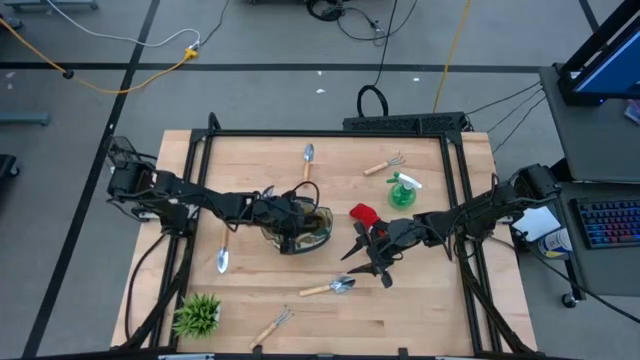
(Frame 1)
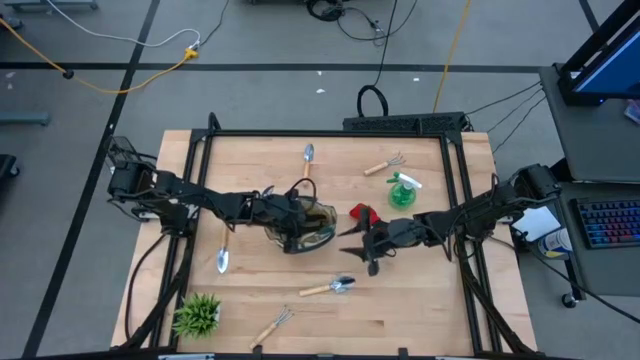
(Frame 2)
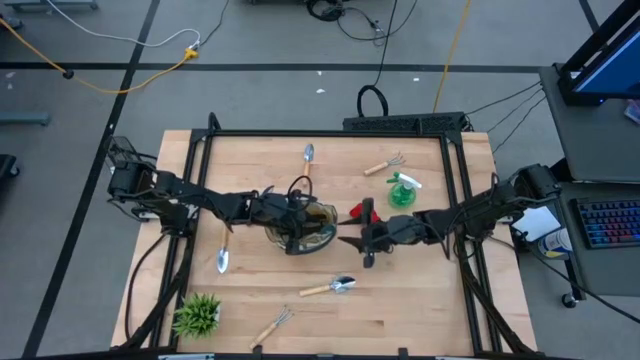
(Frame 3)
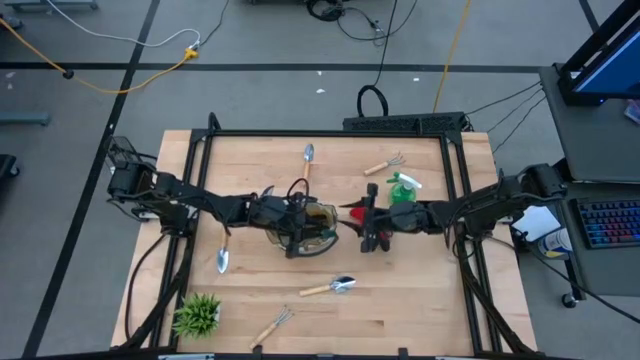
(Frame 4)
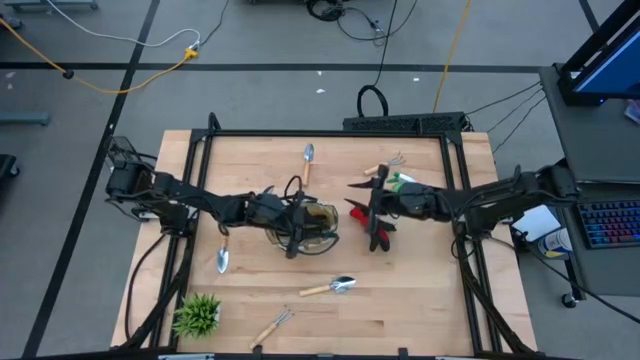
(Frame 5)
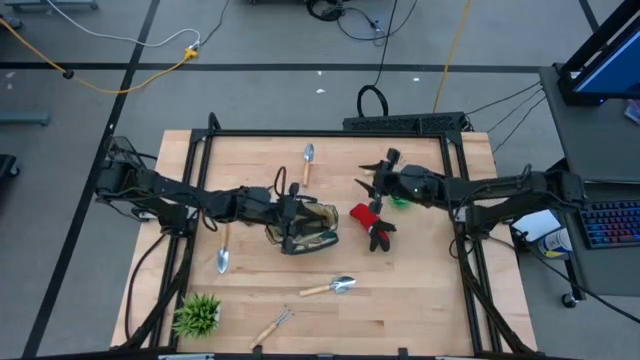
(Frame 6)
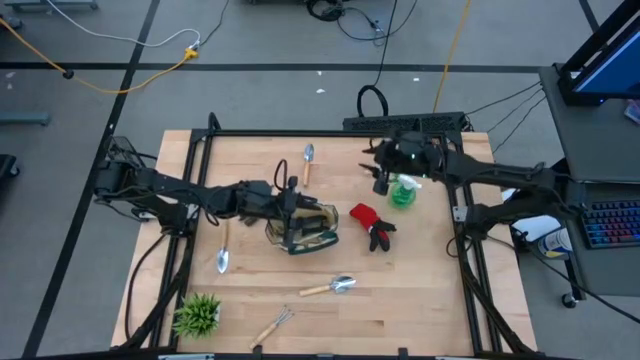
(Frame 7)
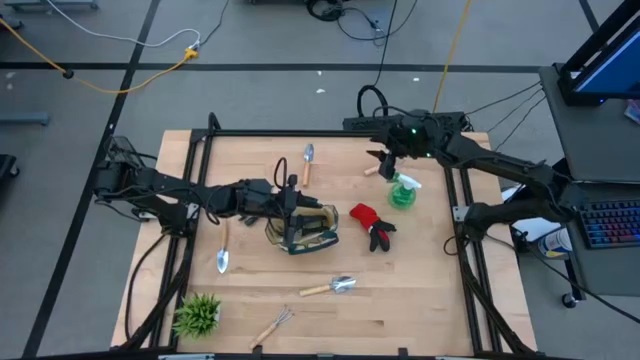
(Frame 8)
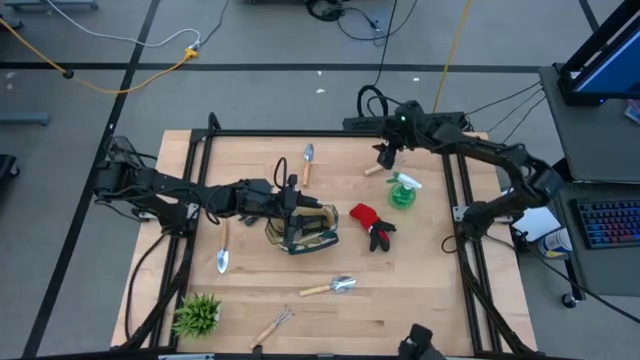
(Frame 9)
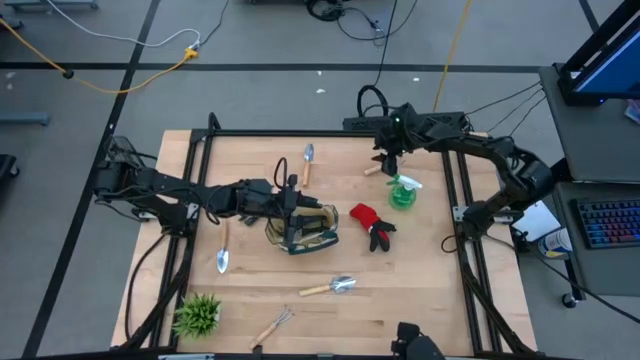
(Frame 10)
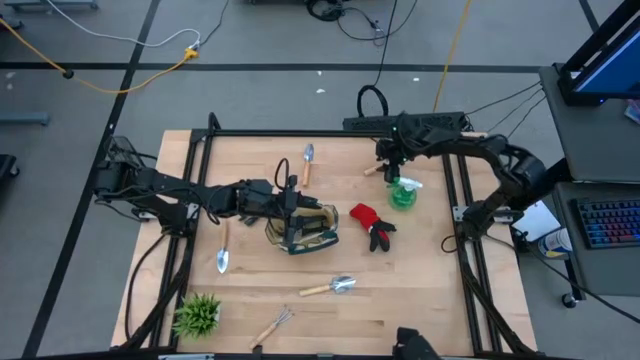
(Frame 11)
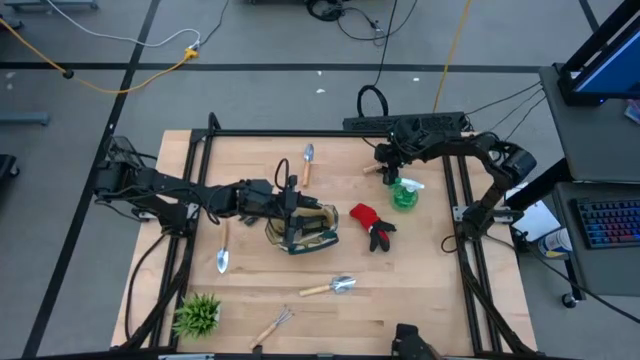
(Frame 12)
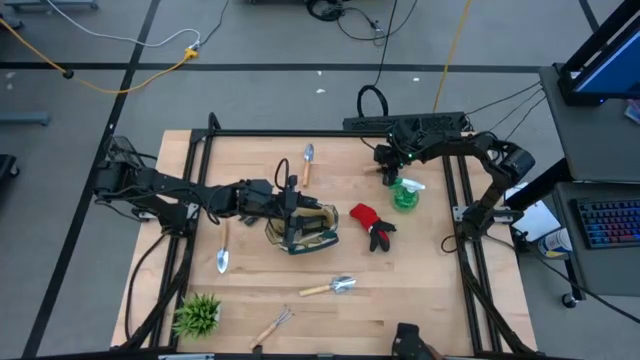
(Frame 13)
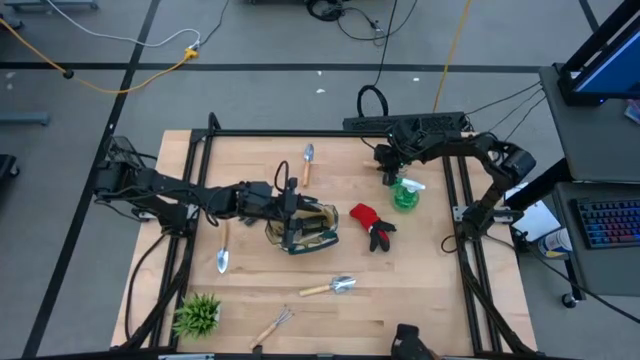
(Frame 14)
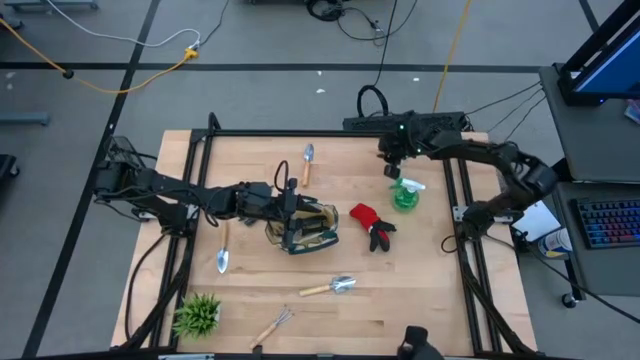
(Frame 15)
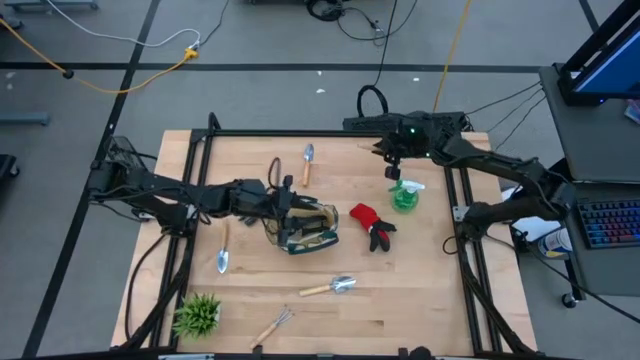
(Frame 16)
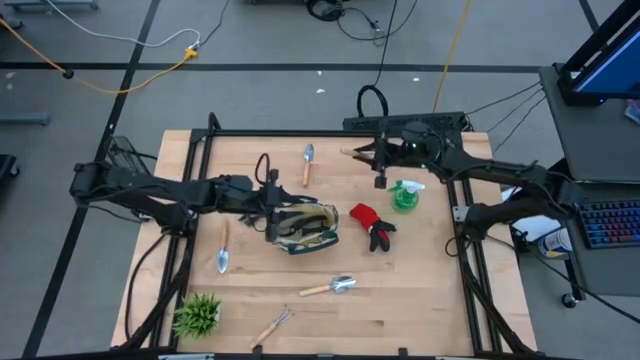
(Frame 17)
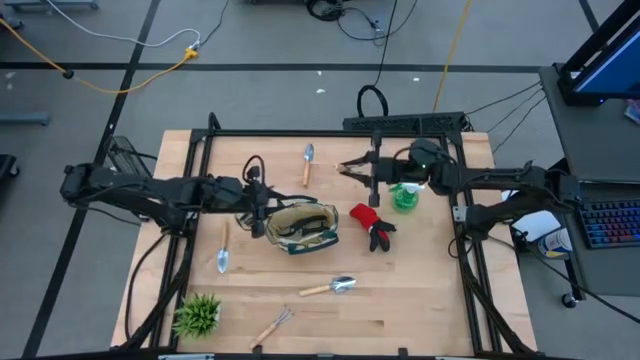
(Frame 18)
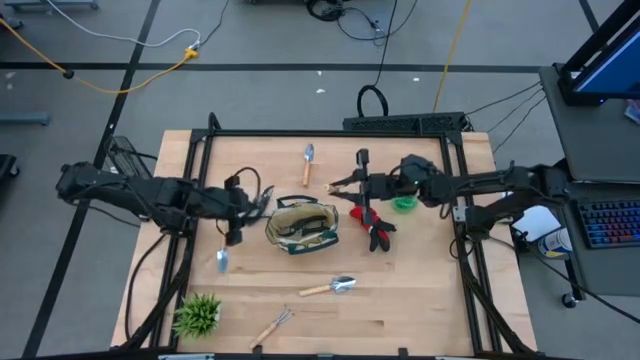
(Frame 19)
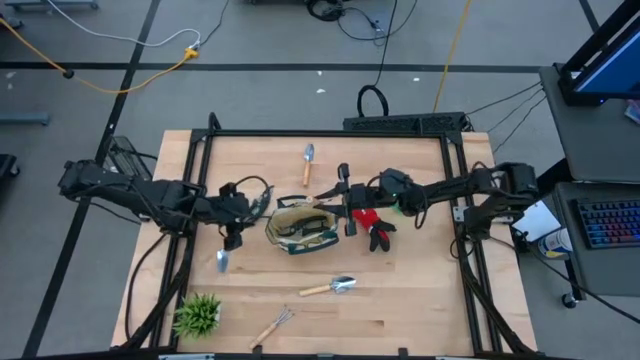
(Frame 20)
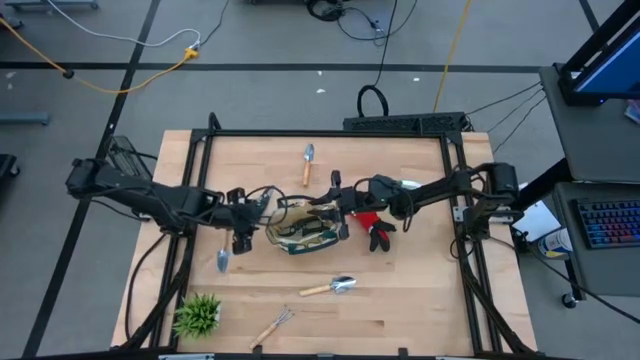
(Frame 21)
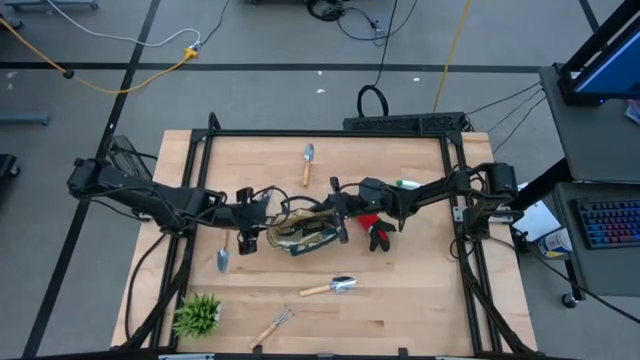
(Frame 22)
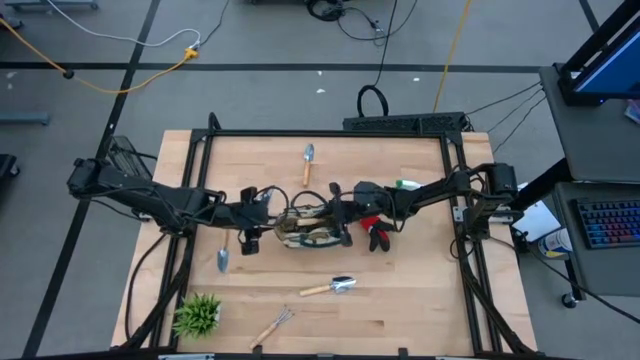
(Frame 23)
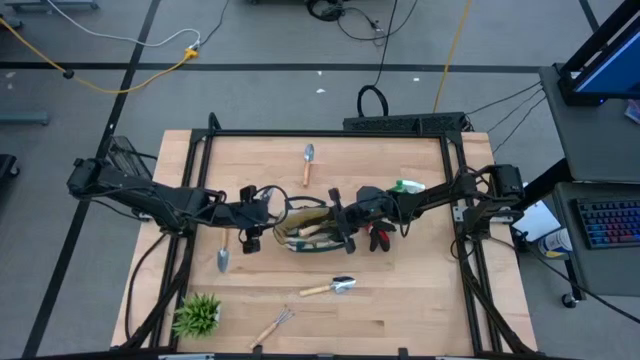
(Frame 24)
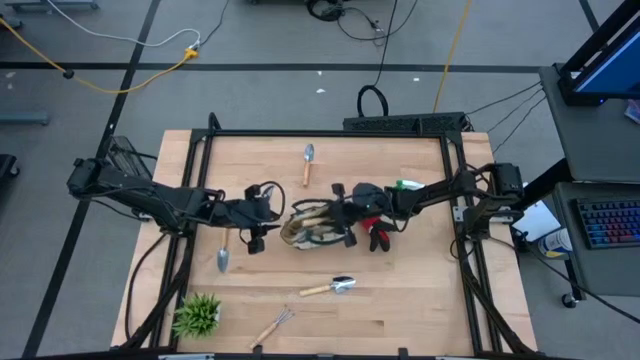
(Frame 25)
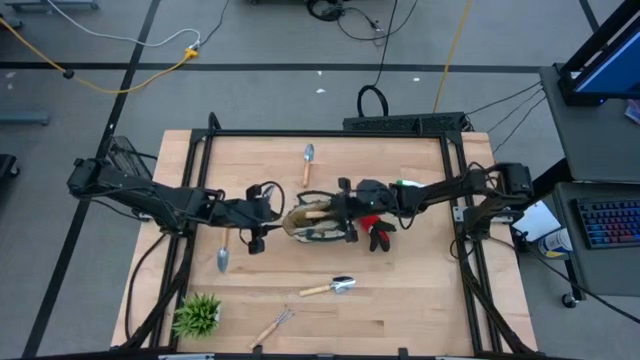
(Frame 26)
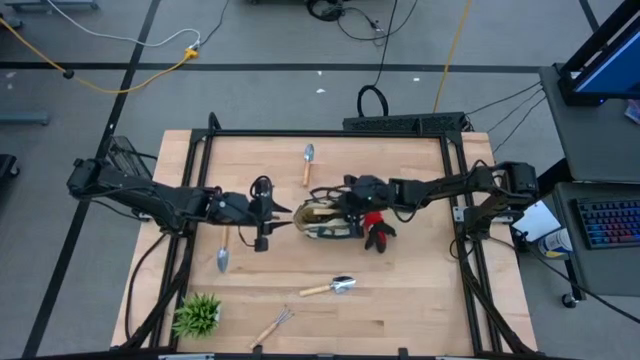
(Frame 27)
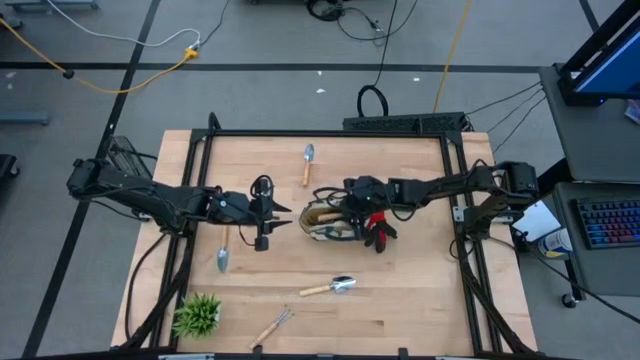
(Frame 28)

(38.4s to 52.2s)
Task: Pick & Place Garden tools in Gardening bag
Put the top brown hand rake into the green gardening bag

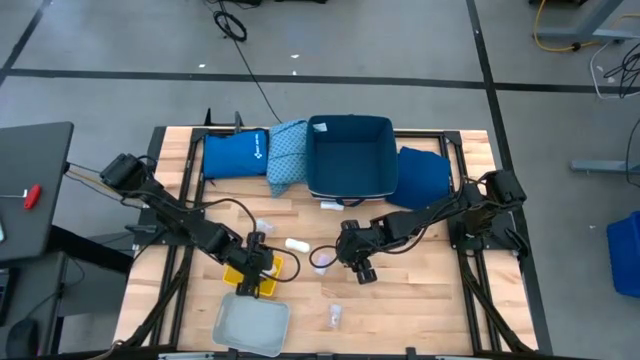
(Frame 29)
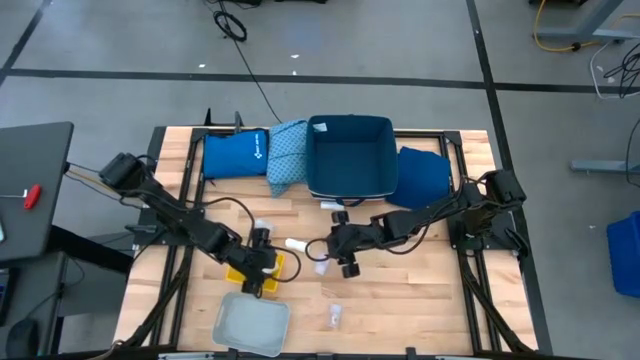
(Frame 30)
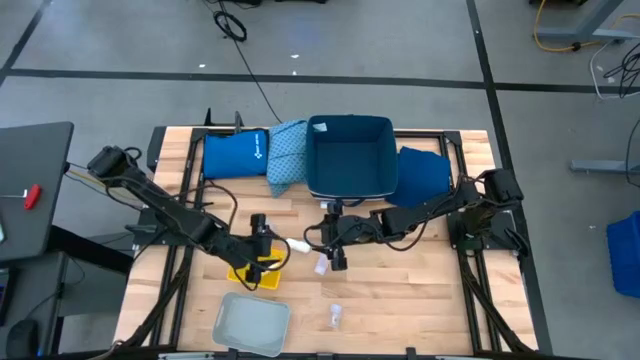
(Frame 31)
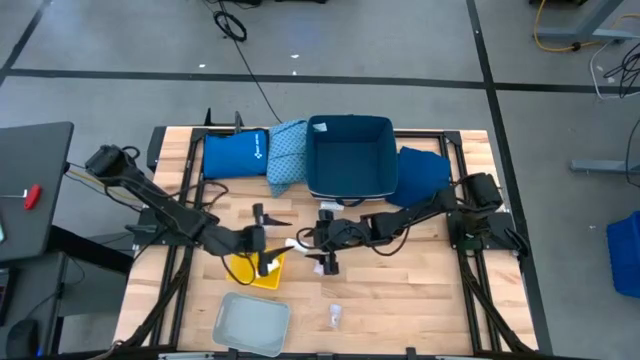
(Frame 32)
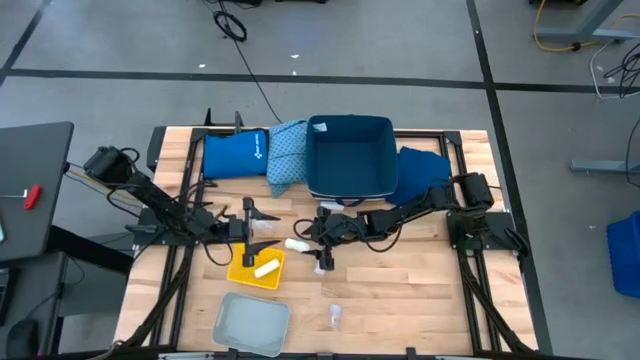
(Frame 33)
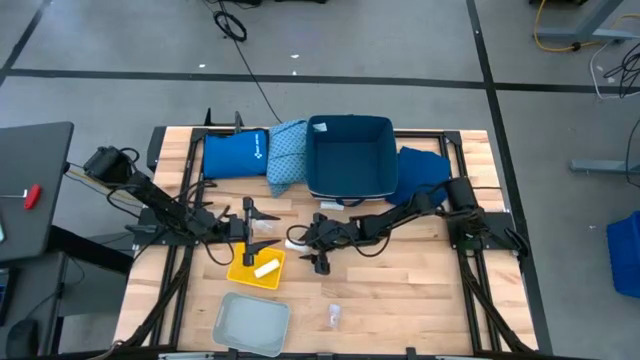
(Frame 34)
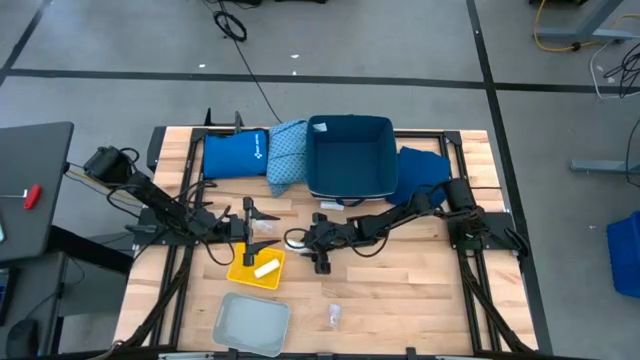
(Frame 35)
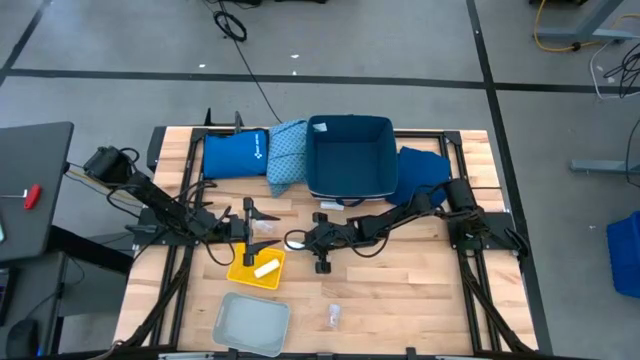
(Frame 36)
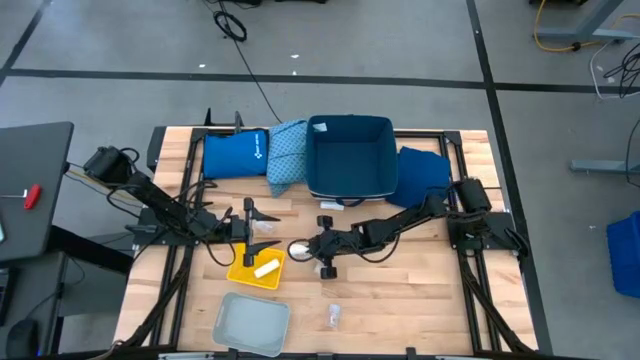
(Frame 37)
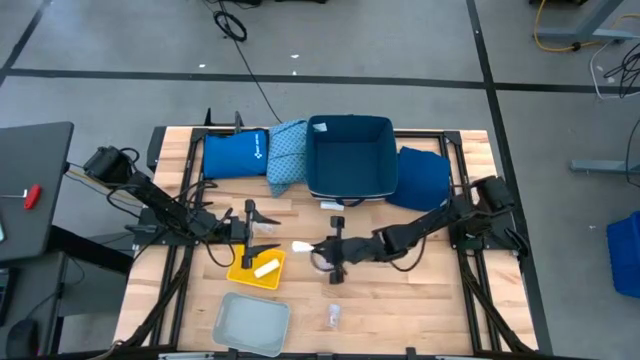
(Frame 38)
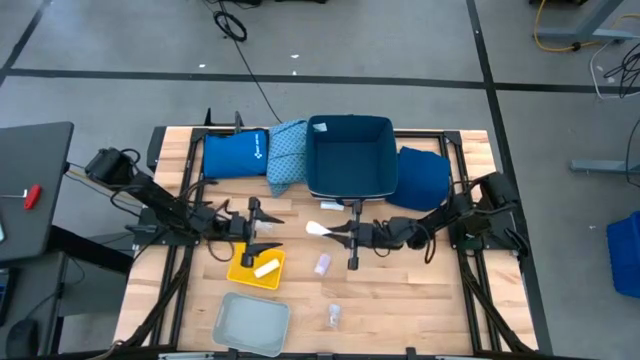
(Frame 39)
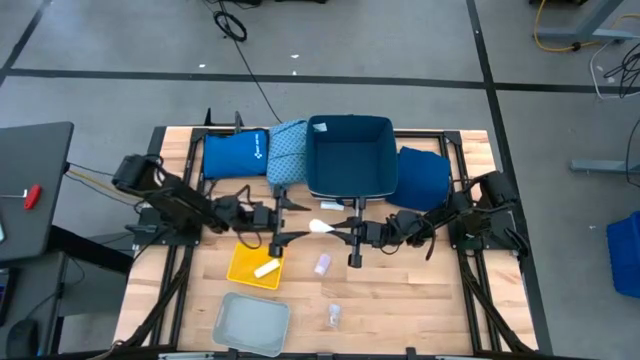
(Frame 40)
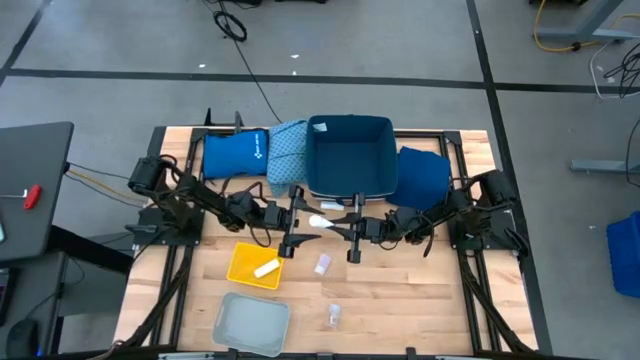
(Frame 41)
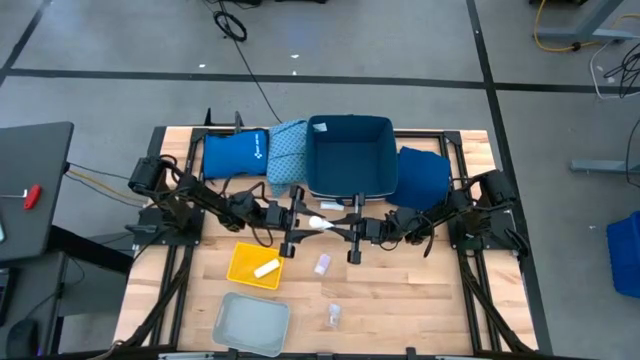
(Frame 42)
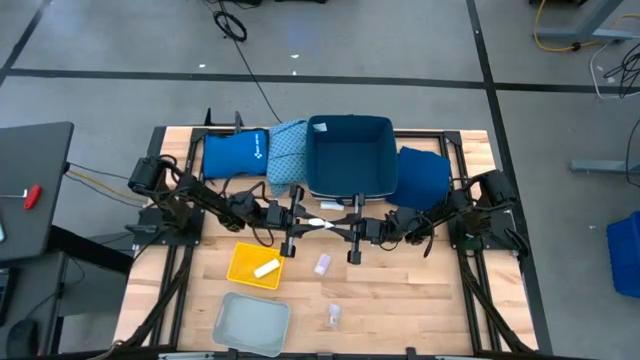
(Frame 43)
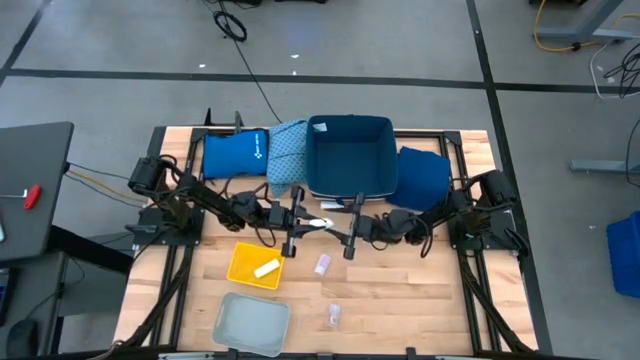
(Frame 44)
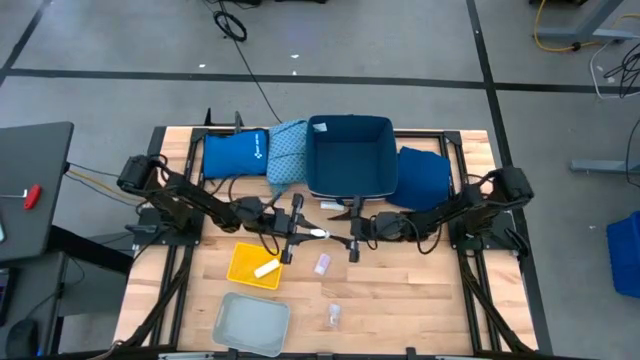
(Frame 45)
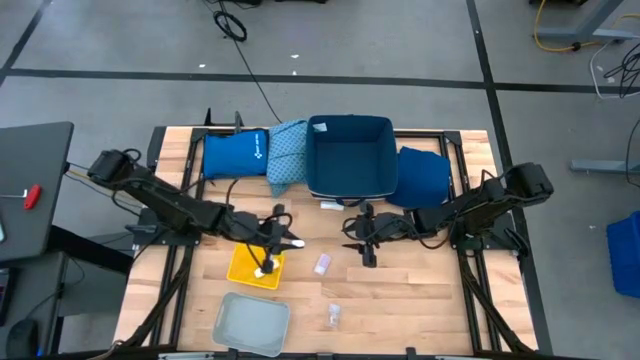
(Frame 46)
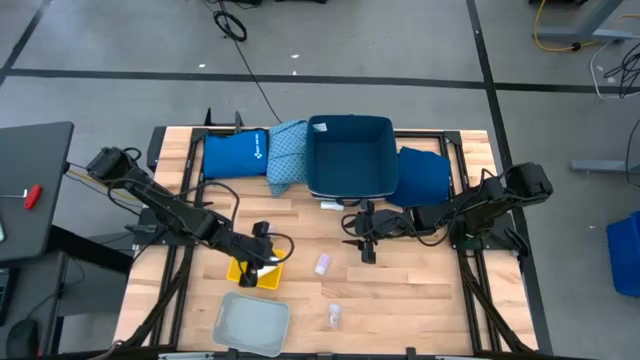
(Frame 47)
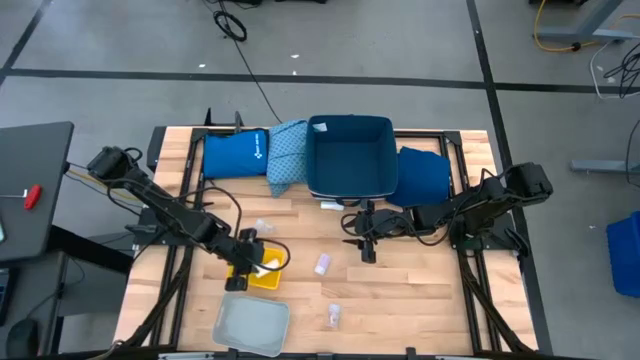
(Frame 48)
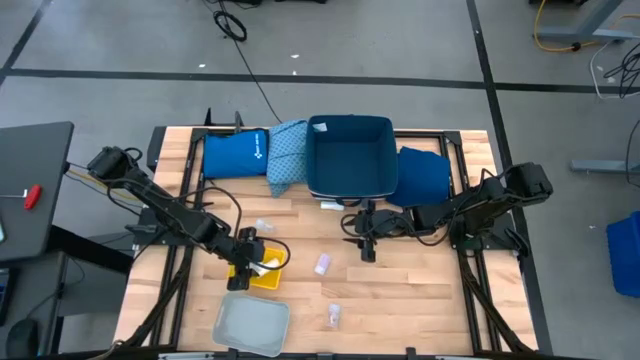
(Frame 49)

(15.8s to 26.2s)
Task: Pick & place medical supplies in basket/bin
Put the bottom white rolled gauze into the yellow bin
